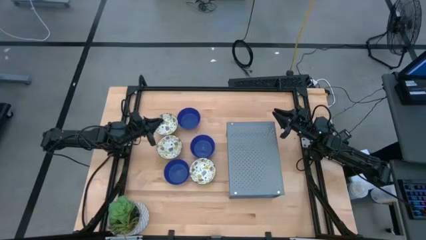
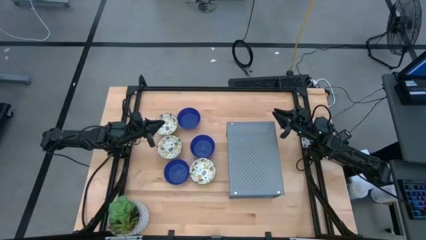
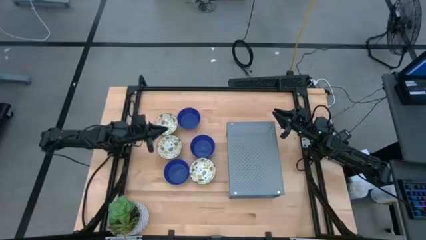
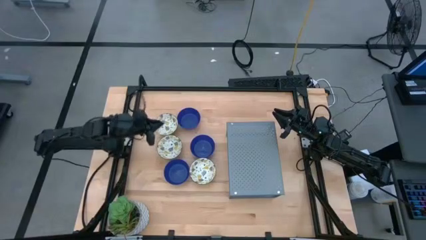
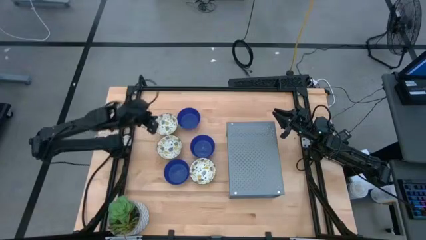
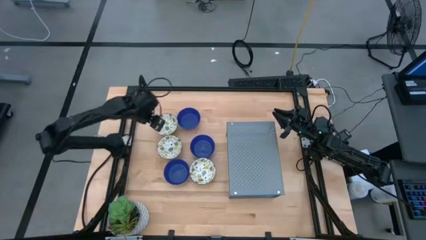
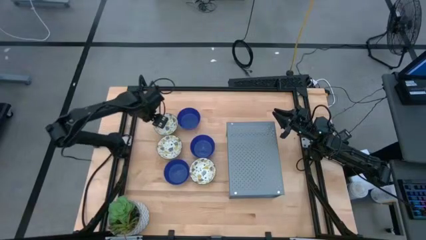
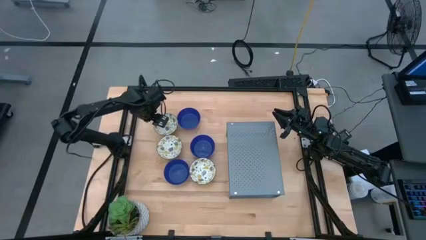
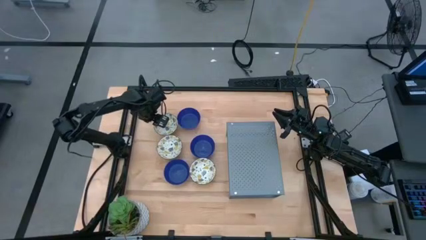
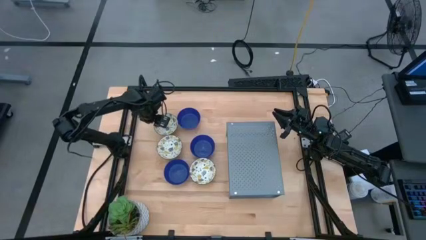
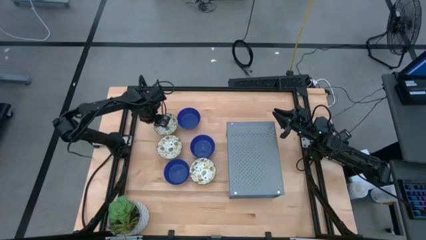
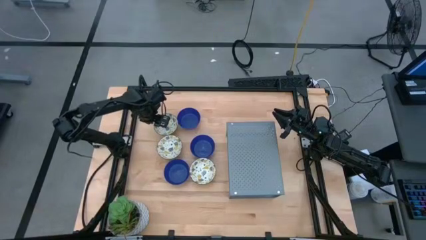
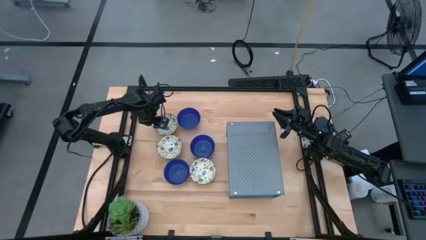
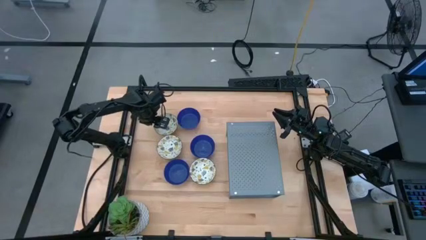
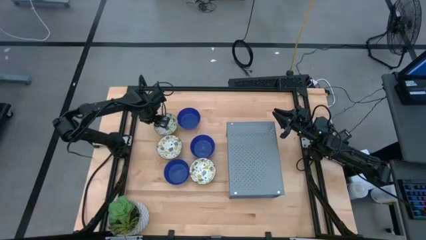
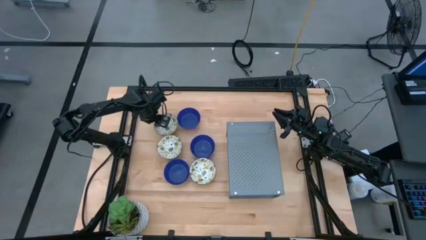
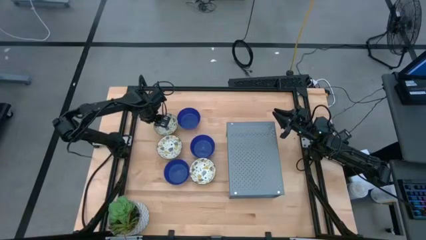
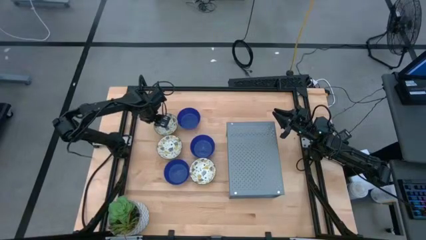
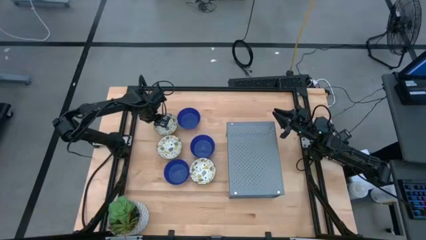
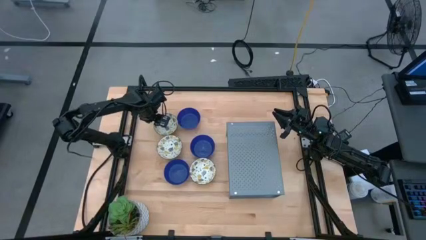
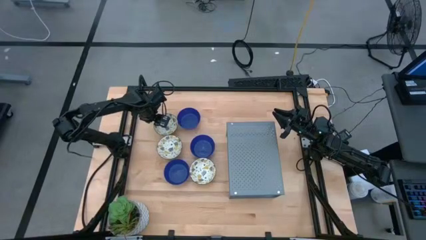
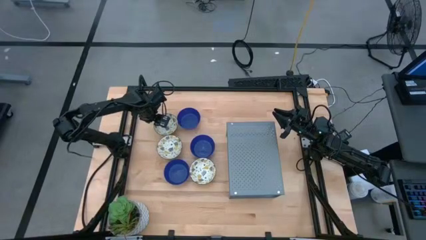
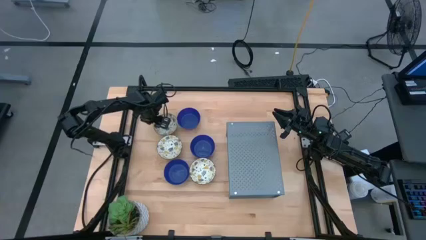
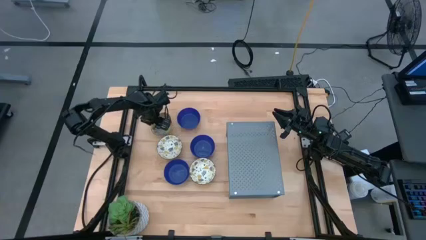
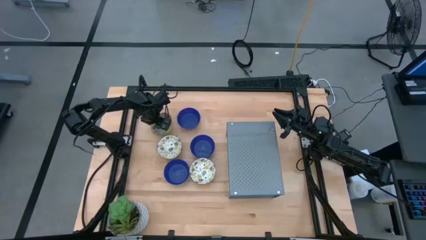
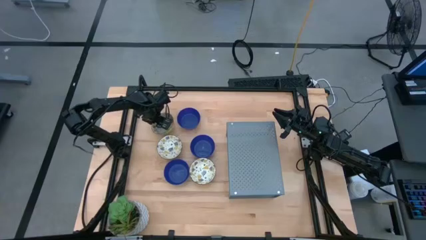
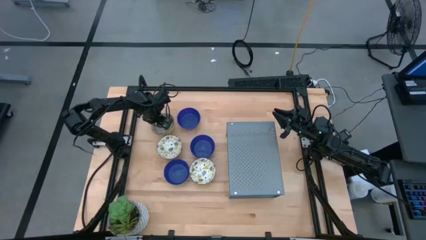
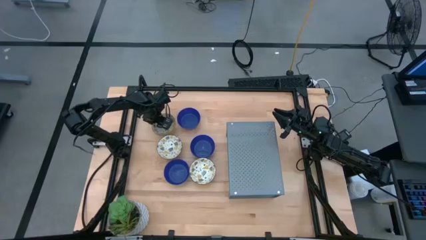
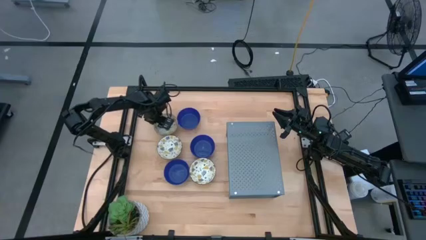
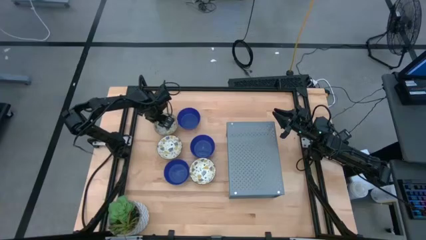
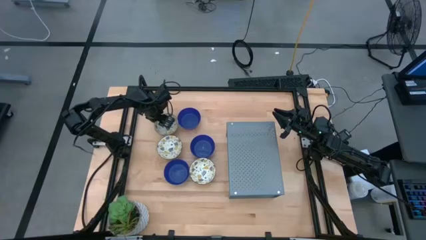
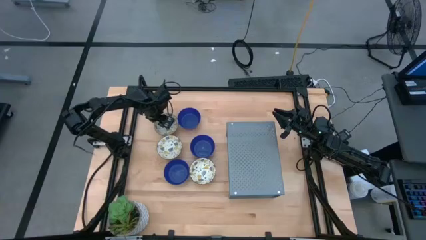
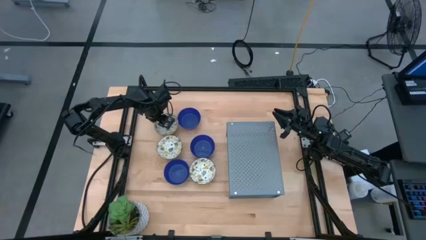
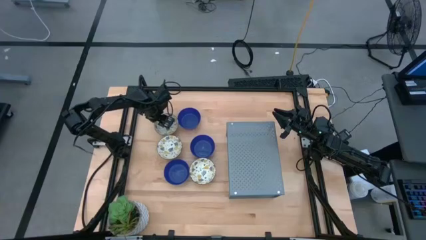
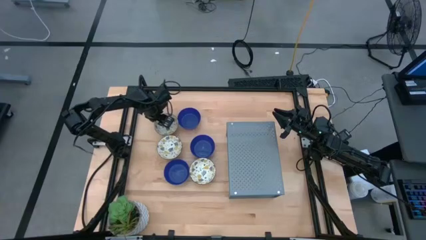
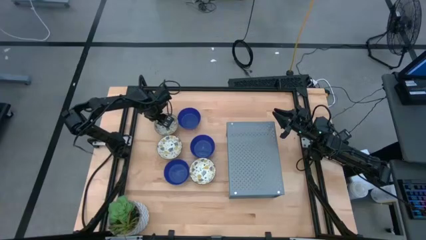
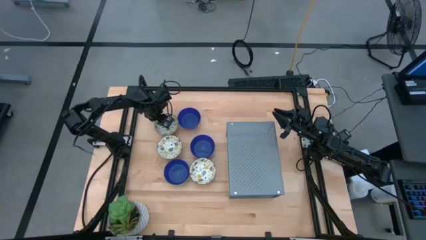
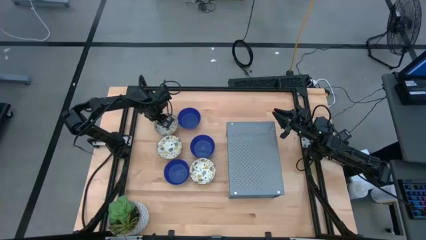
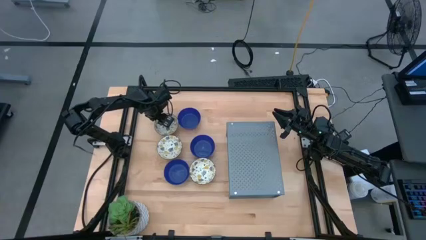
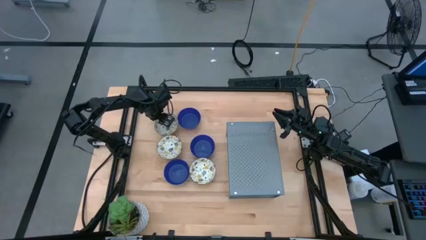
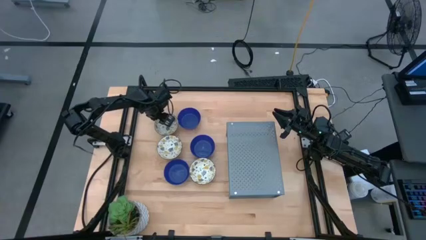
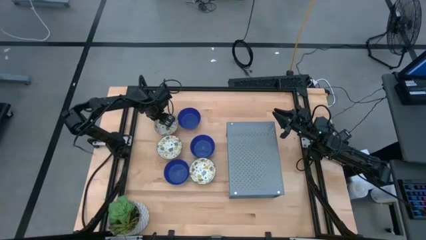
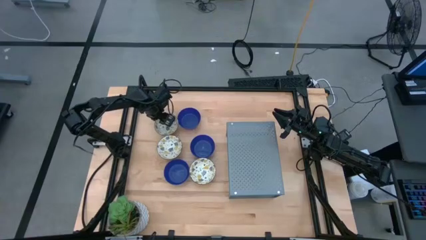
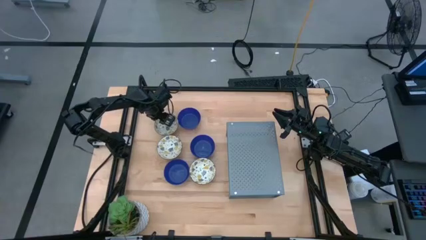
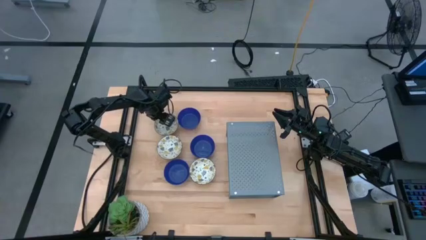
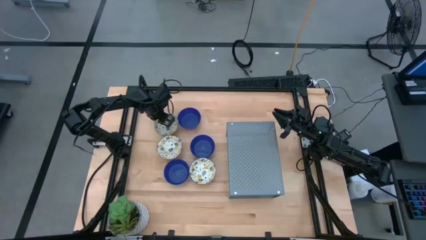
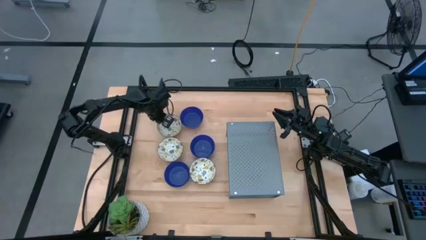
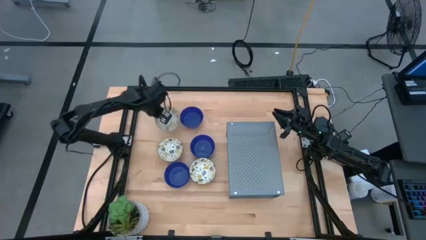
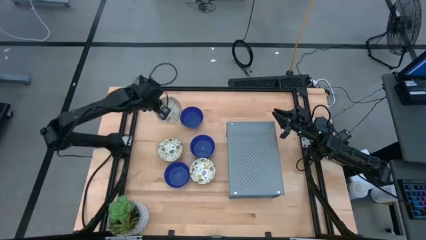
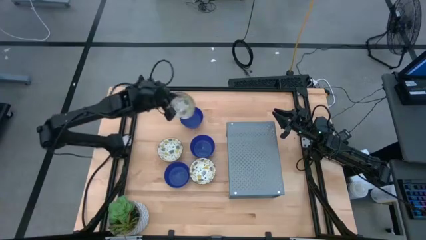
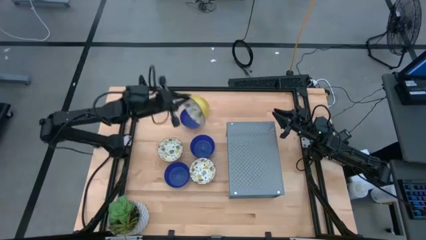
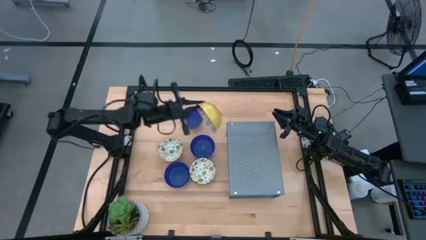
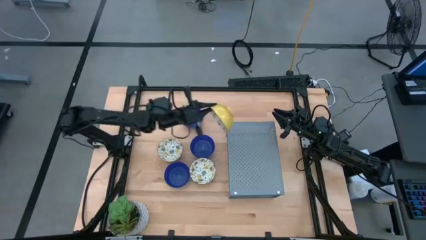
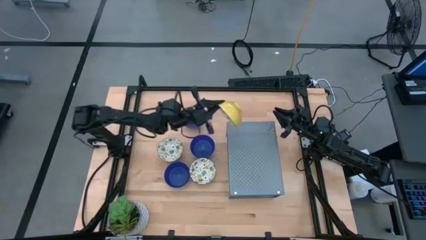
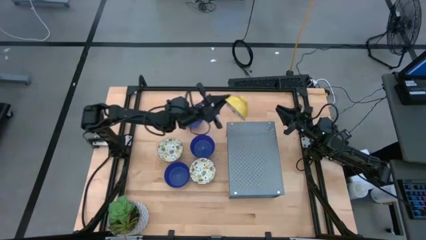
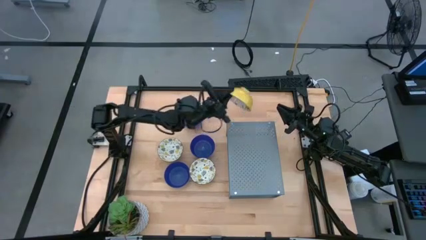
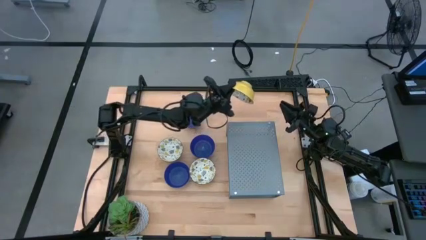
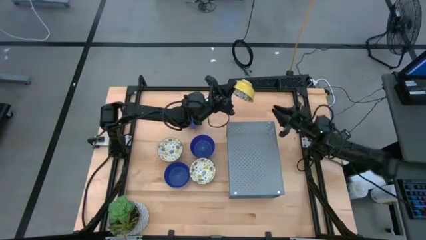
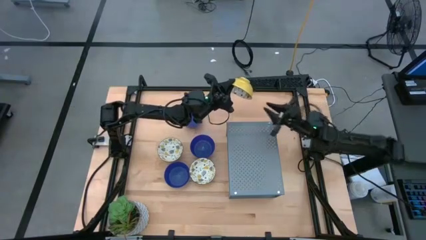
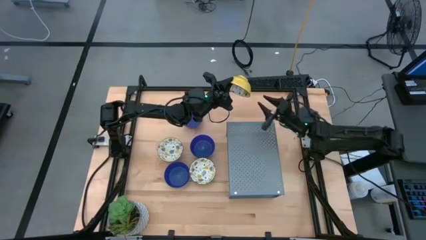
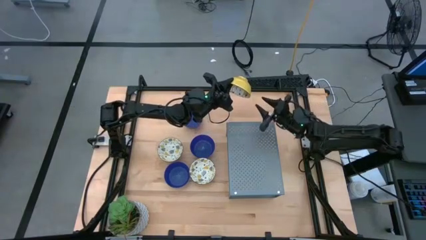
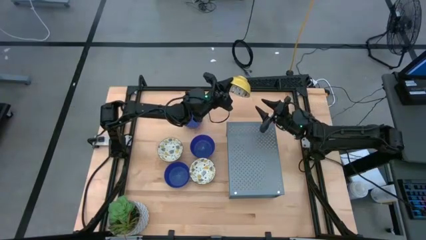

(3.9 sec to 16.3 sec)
Task: Pick & Place Mini bowls
Put the top left yellow bowl on the shelf
